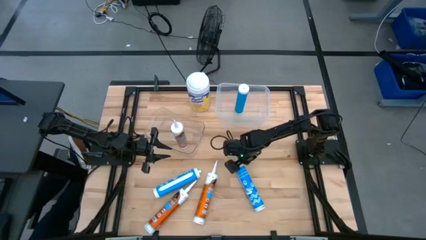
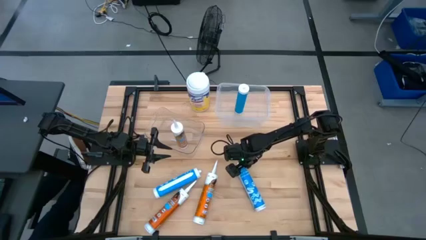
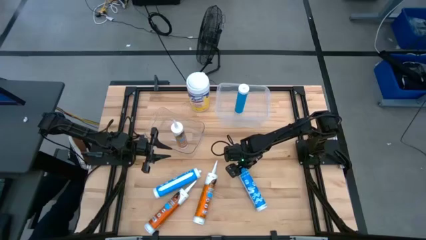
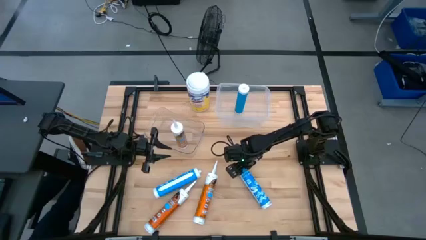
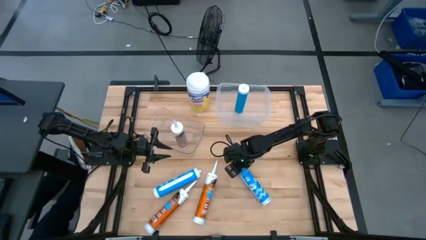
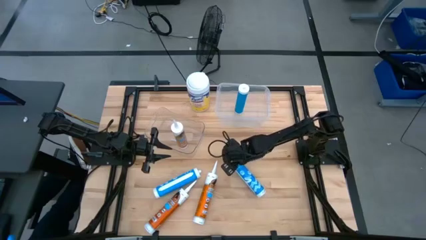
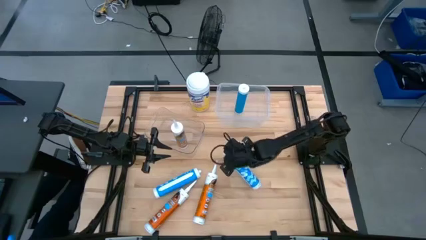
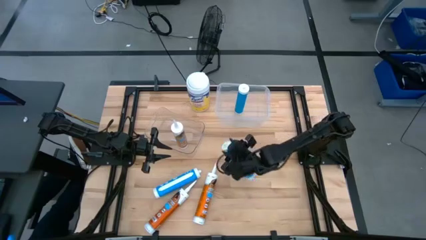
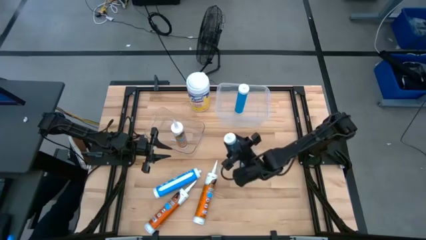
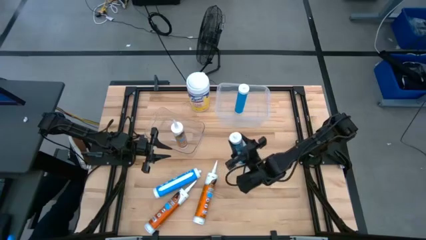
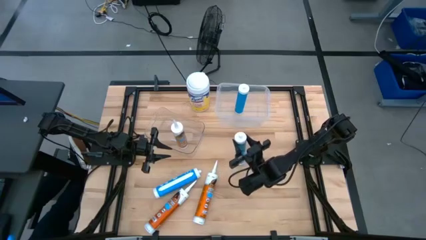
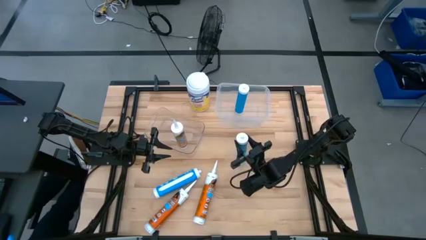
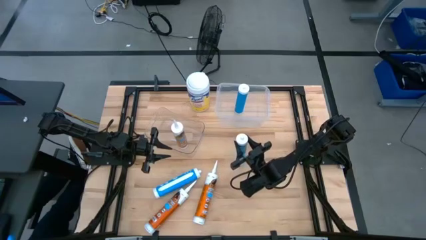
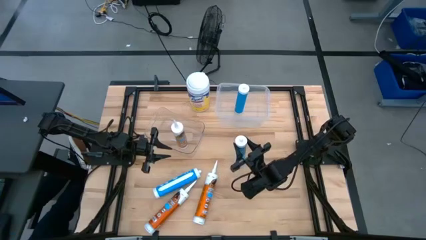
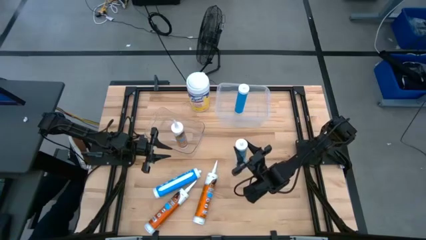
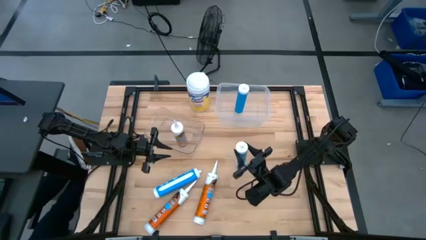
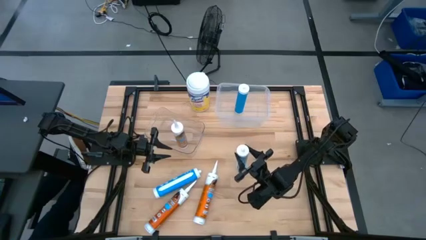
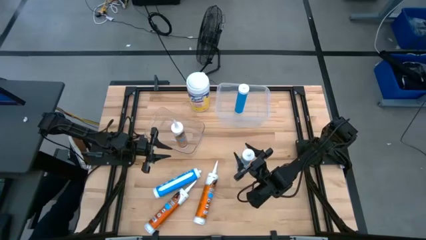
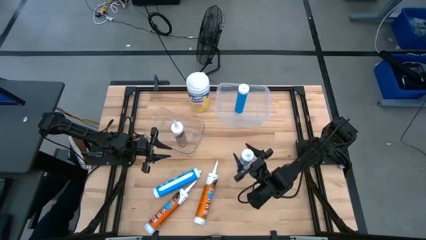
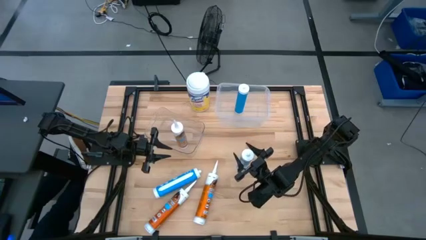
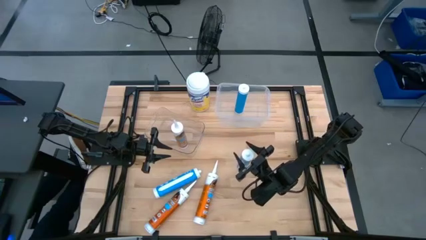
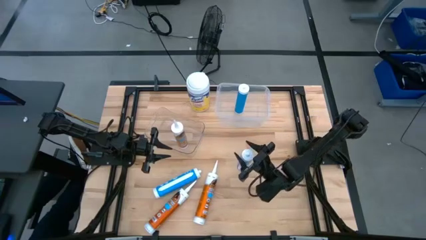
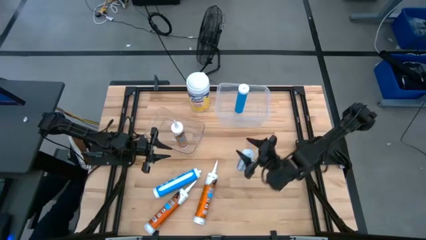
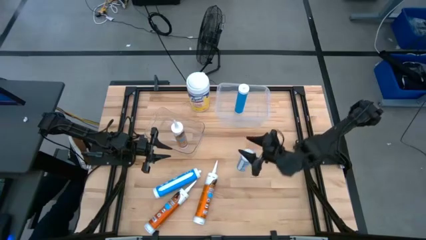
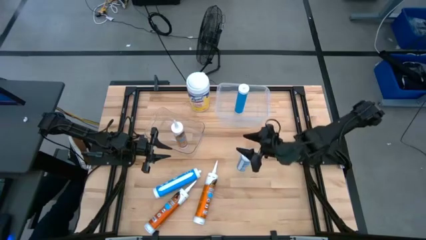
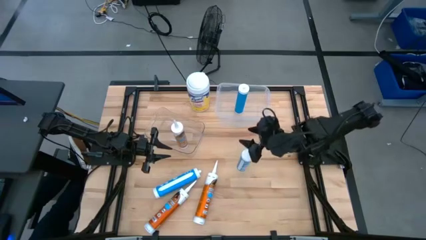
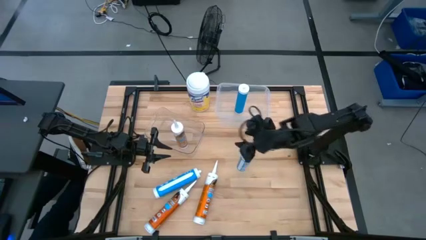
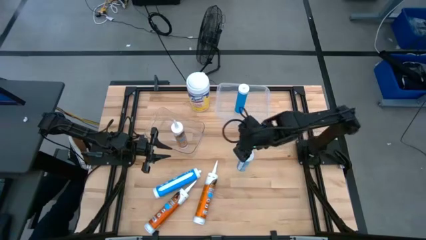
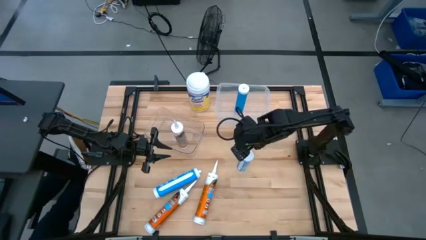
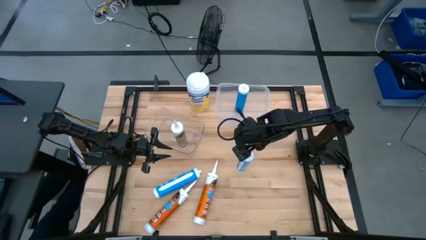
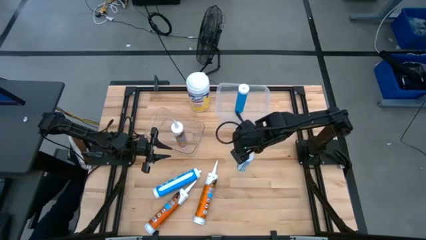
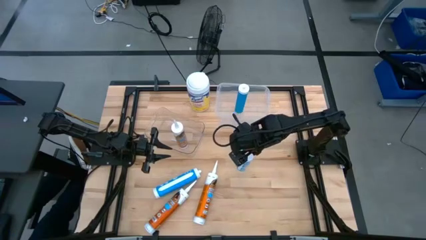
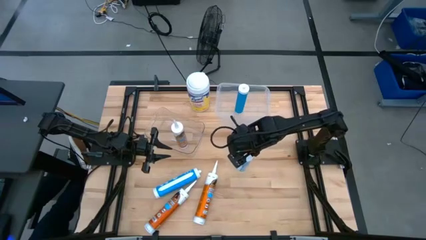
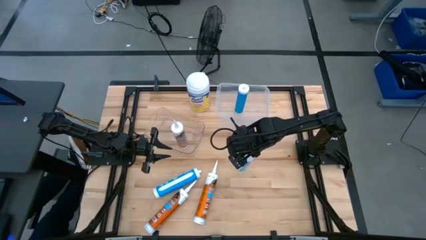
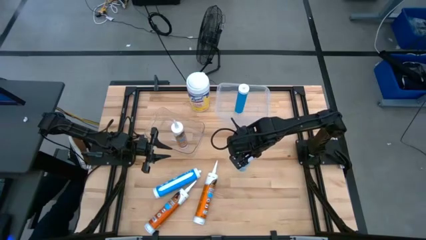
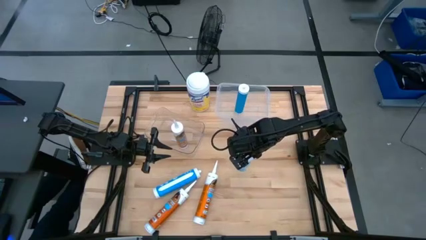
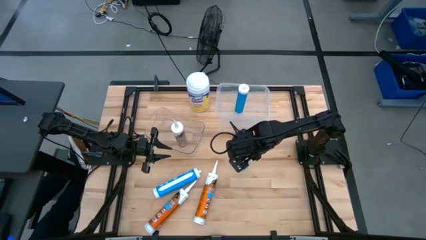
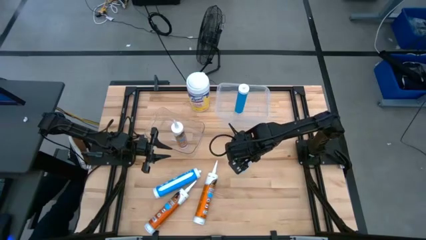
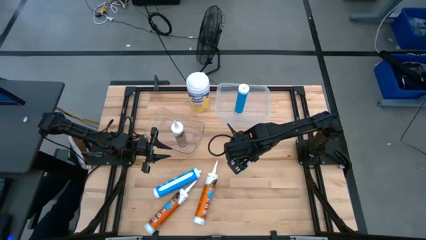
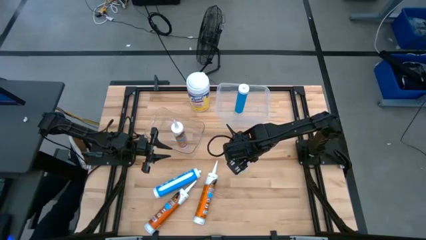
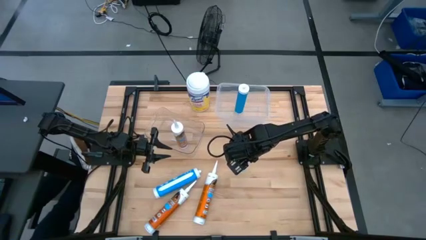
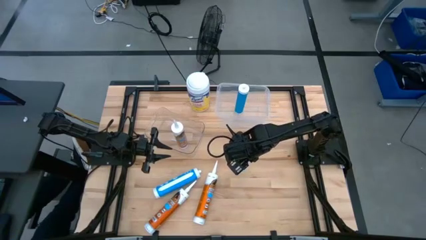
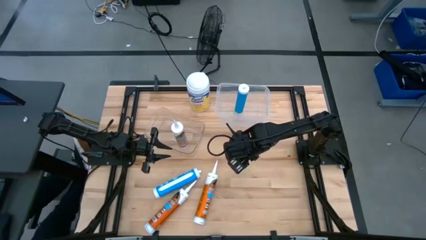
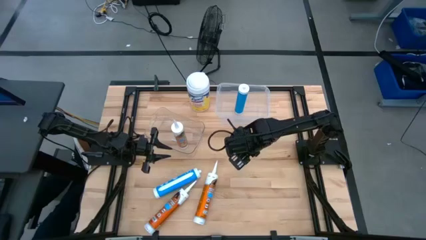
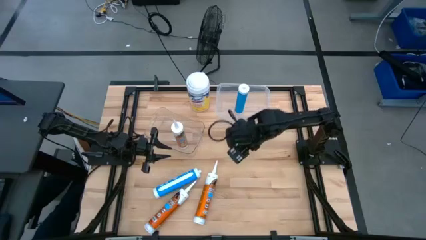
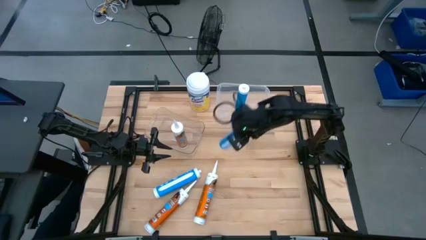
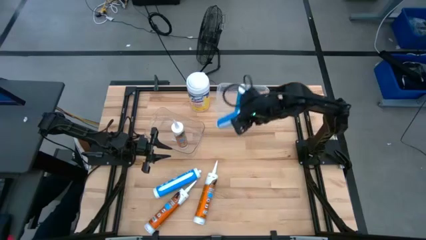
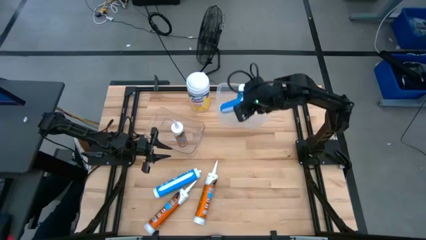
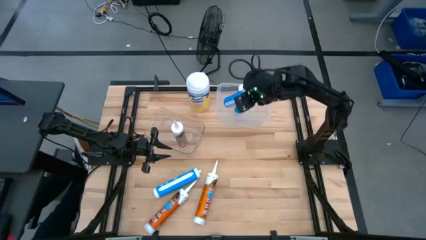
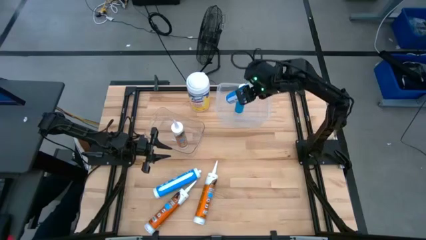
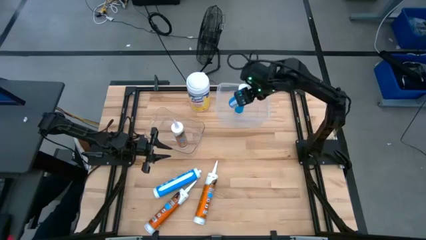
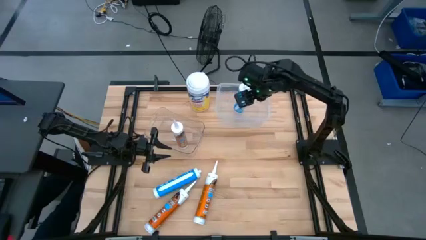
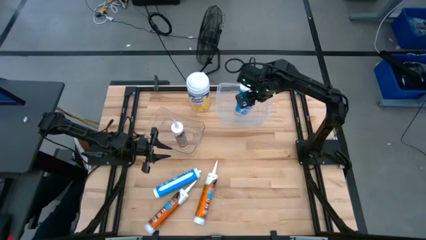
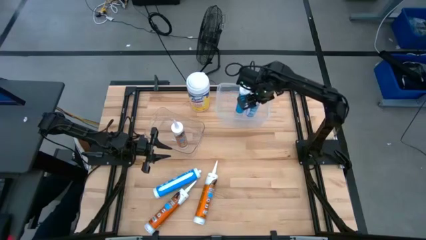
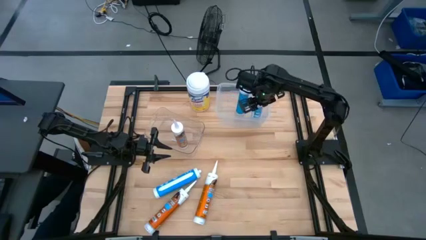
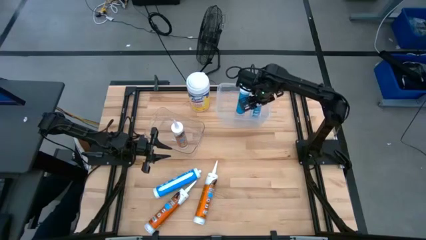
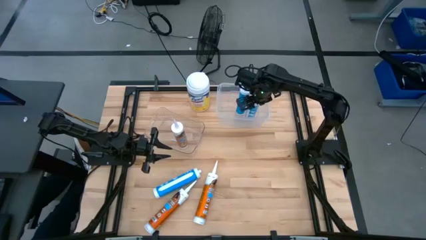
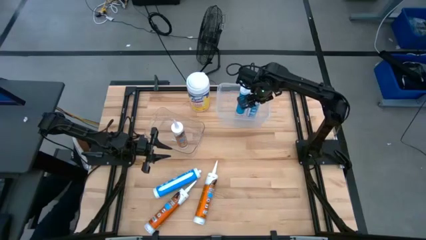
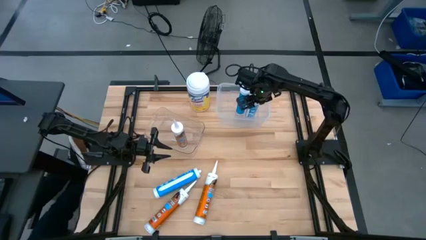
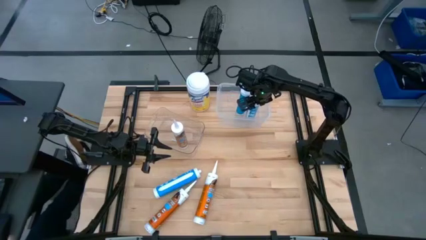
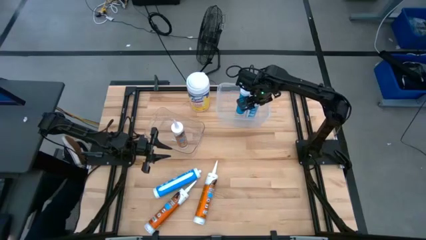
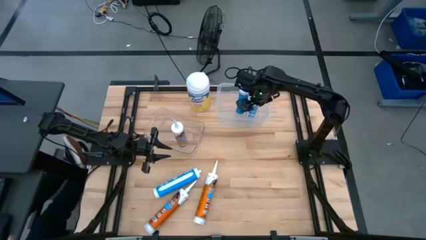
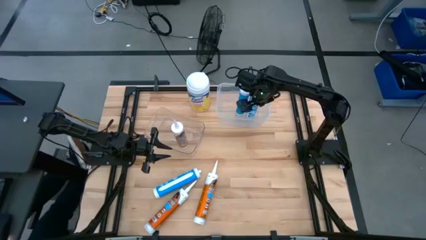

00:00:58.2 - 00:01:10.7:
Task: Pick & place silicon tubes, Sealant and Lysol wipes
Put the right blue sealant into the top transparent bin

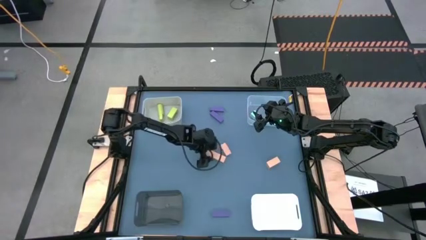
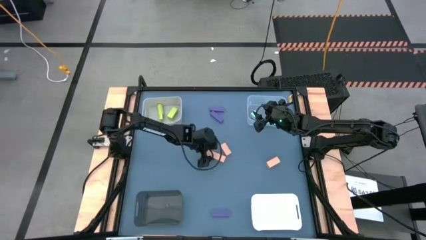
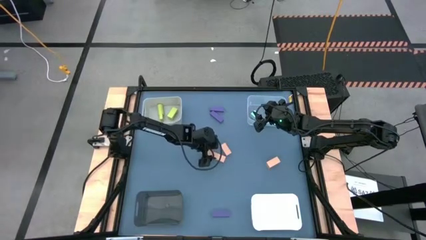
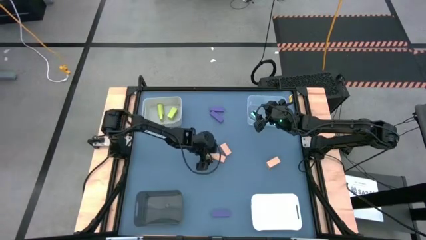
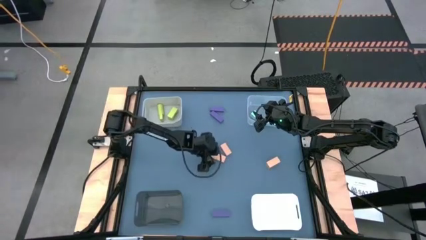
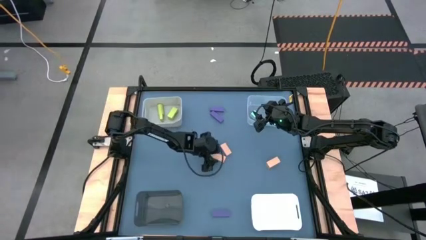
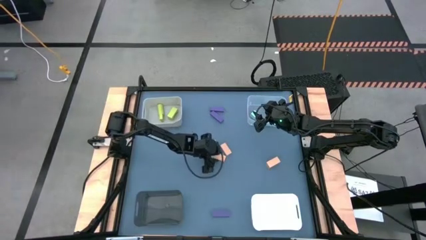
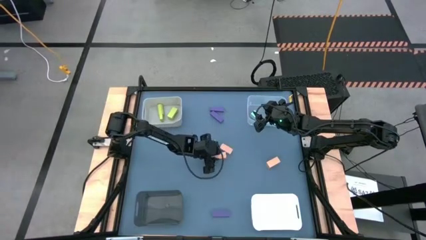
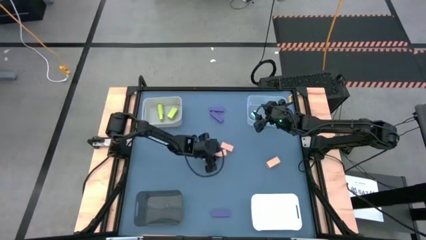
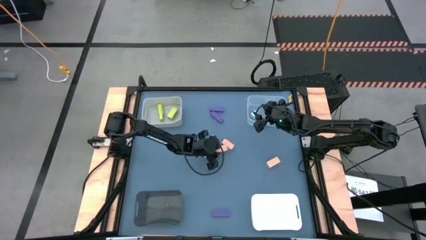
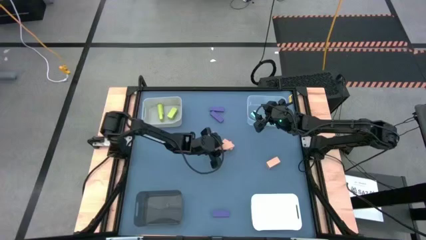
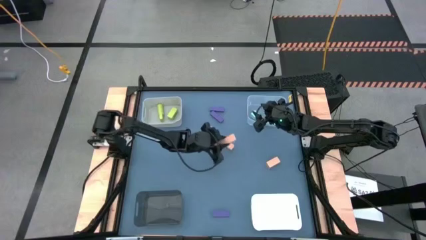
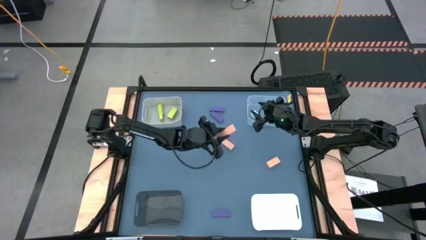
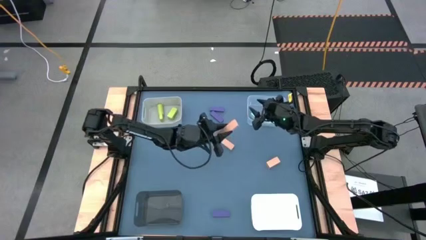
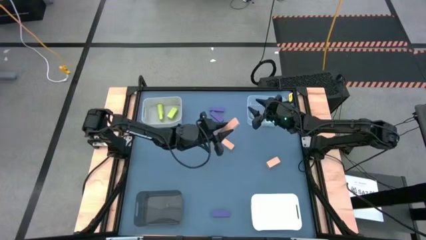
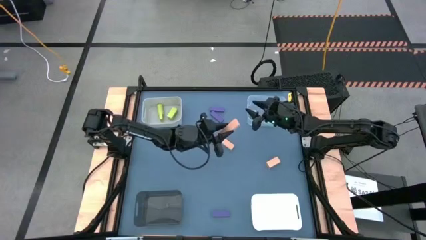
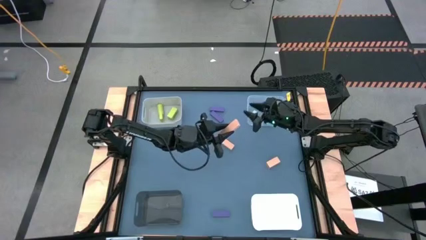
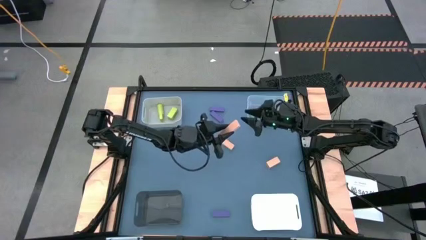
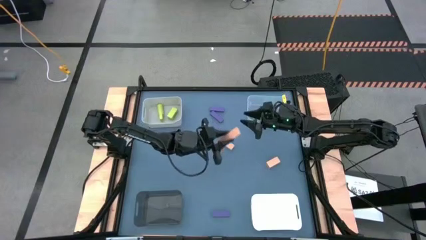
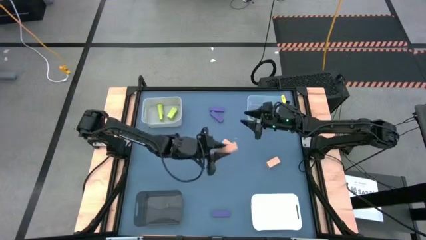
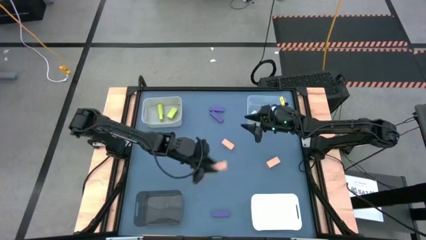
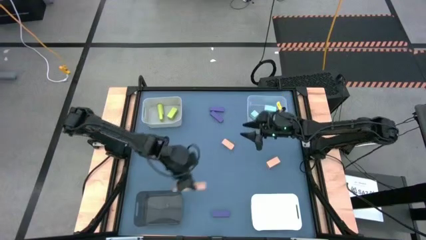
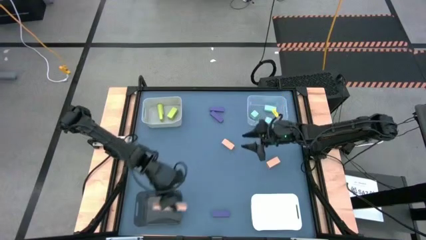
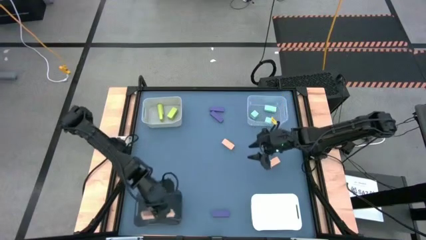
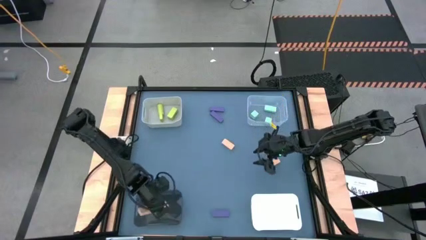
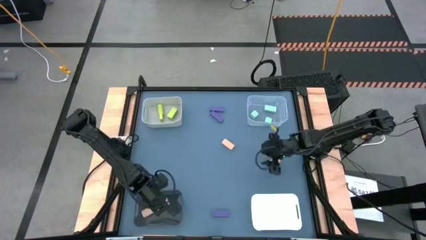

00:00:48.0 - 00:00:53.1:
Task: Sort & place blocks by color
Put the orange block into the black bin
